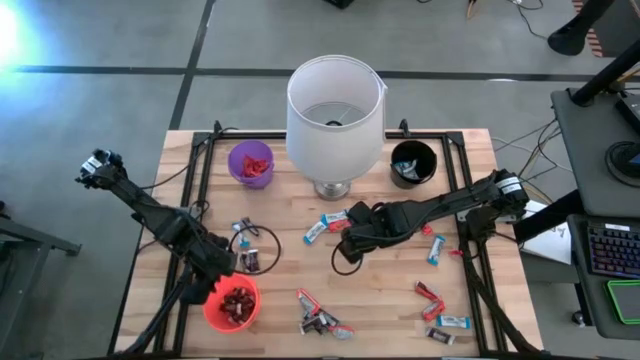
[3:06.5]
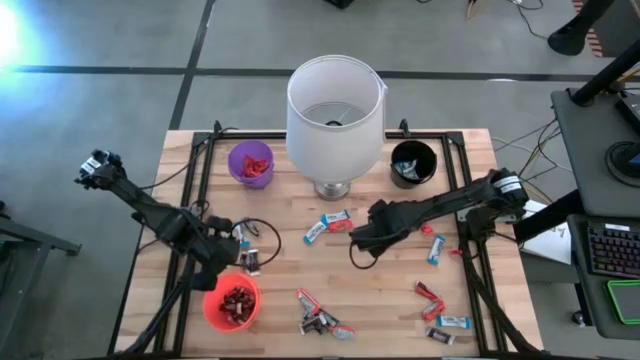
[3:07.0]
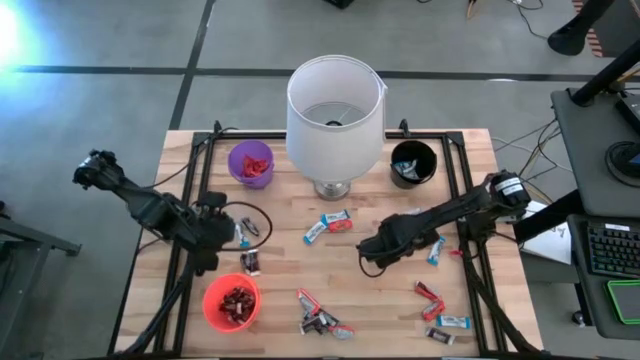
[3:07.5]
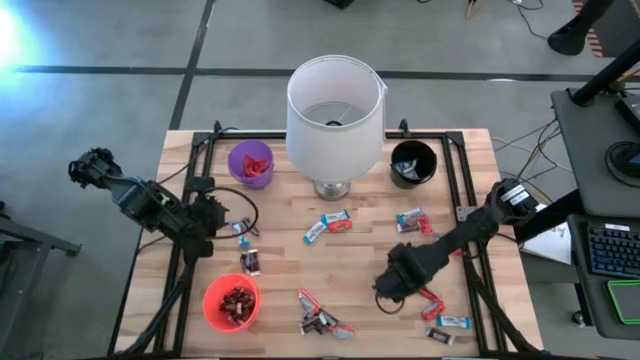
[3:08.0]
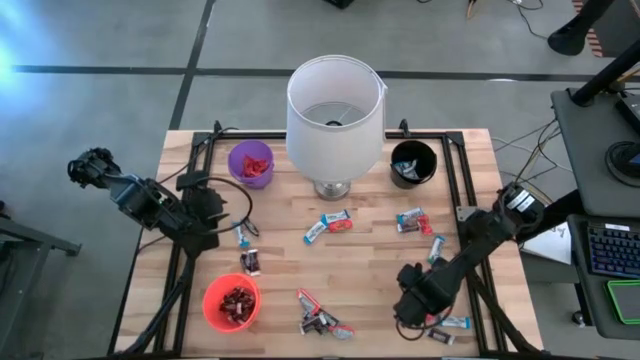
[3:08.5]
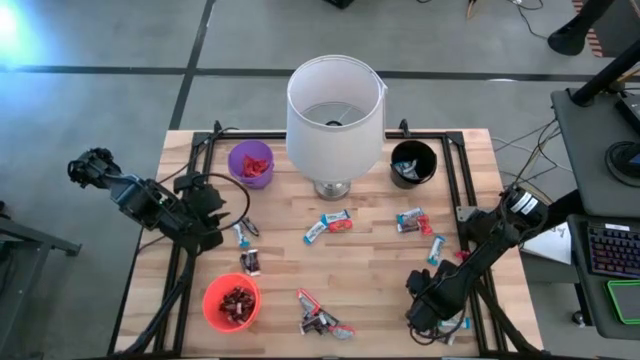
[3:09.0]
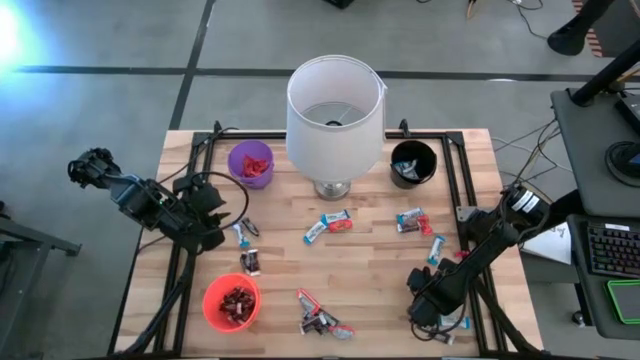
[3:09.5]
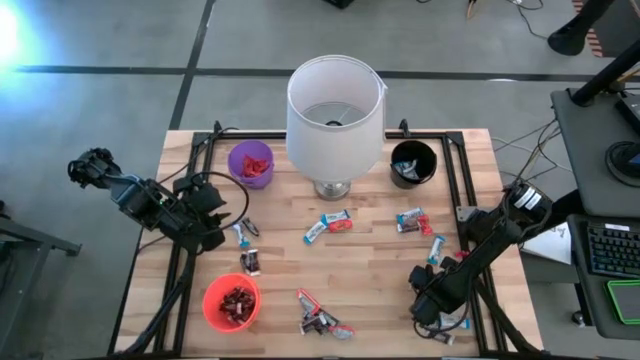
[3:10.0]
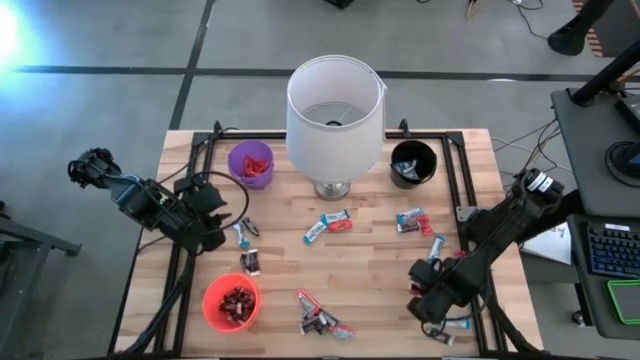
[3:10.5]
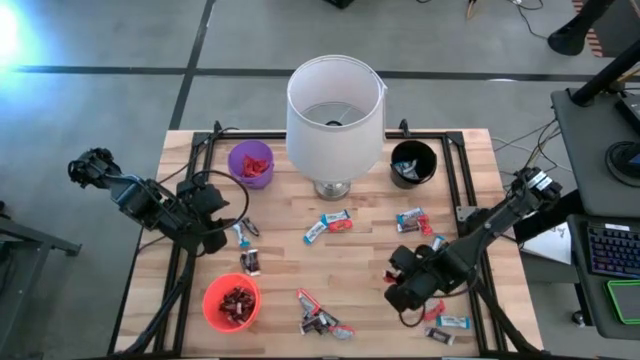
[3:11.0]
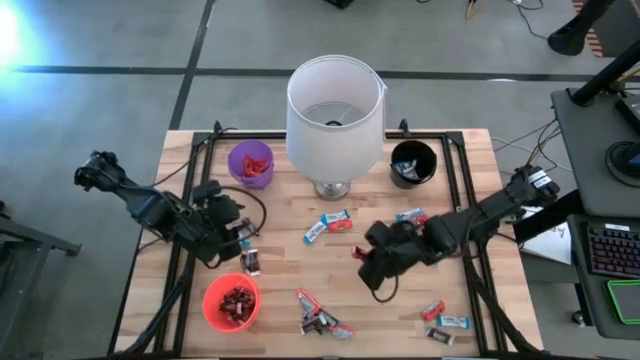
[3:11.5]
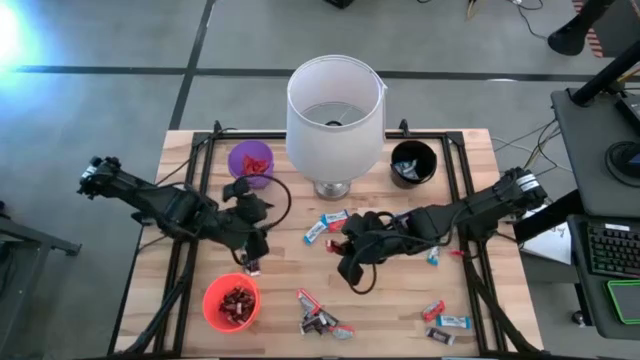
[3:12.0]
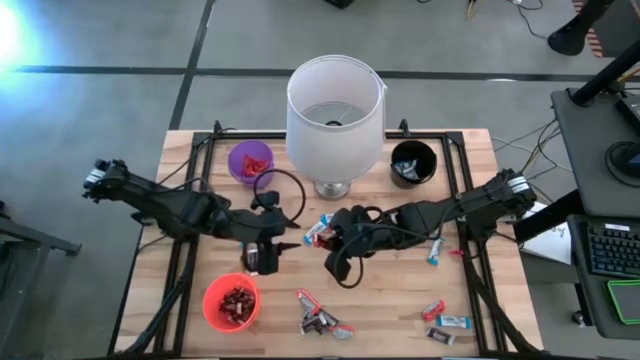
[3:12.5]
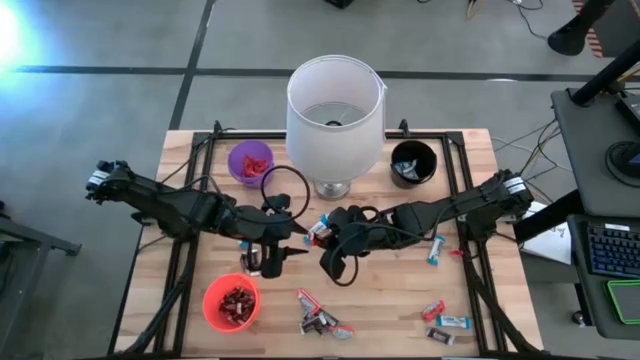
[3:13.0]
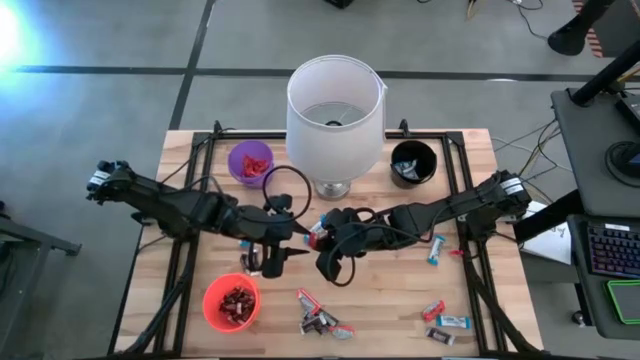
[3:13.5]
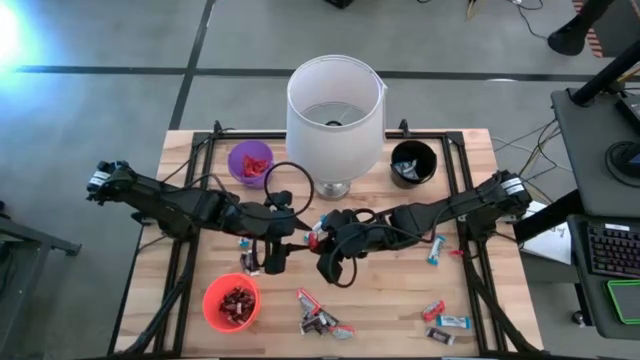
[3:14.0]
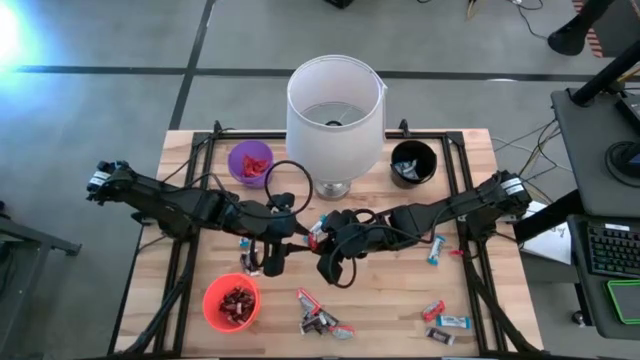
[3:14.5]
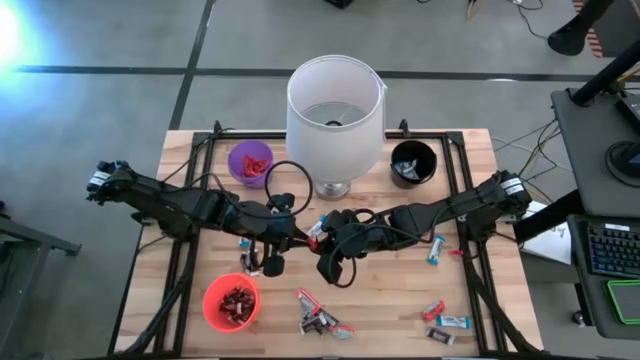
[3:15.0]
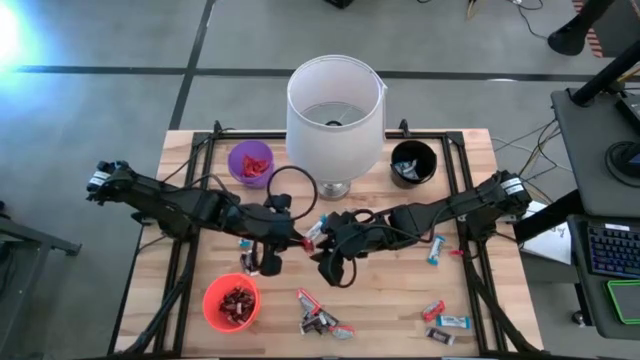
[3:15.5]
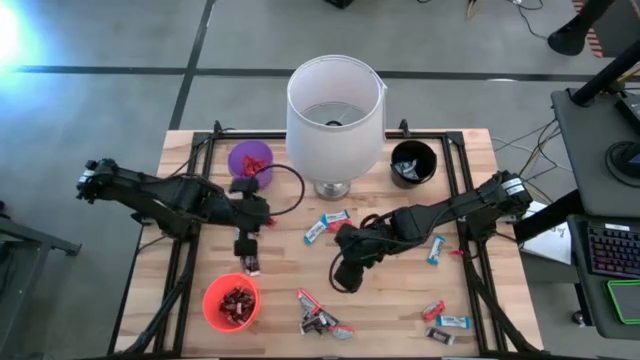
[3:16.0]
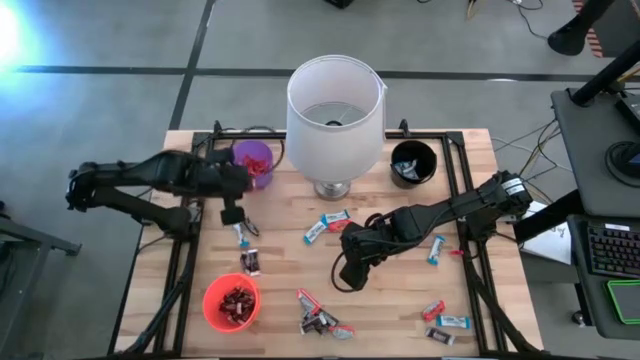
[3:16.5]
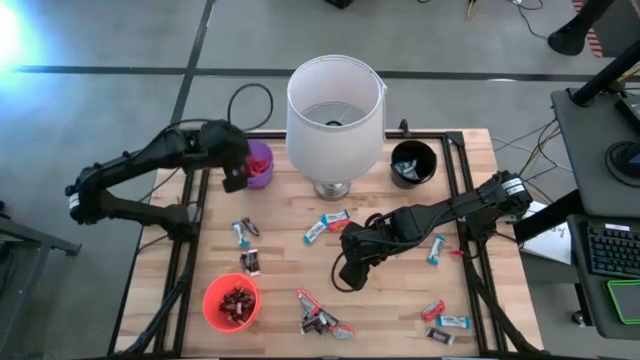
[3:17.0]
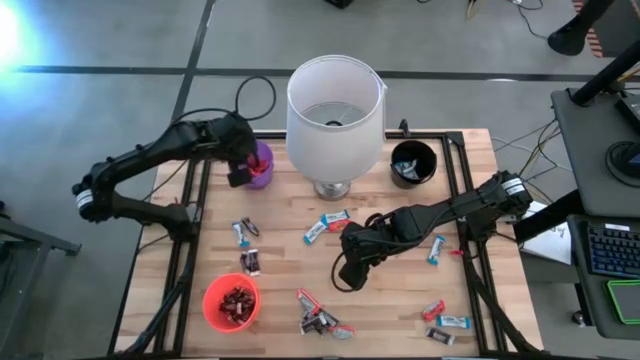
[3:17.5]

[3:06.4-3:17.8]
Task: Sort candy
Put the black chocolate into the orange bucket

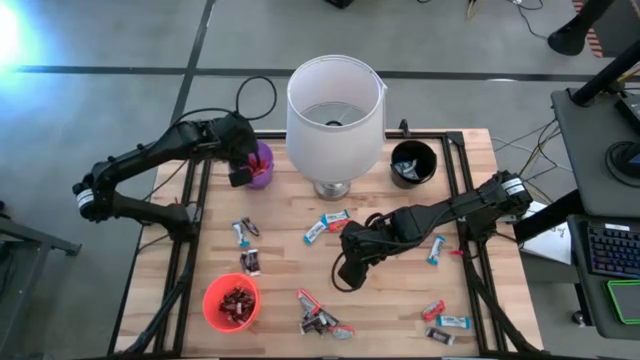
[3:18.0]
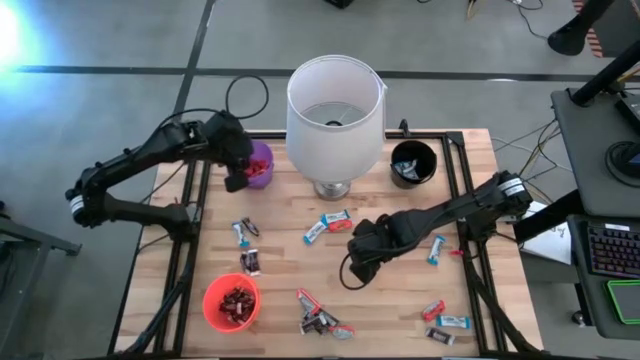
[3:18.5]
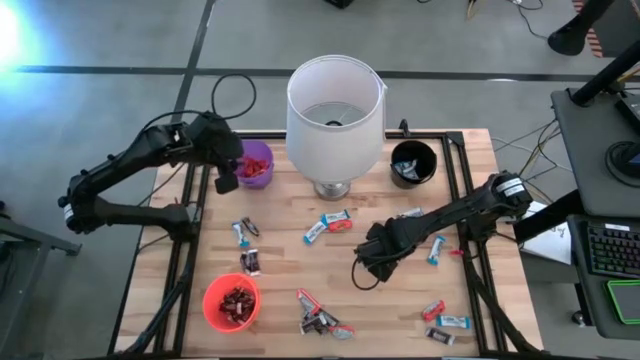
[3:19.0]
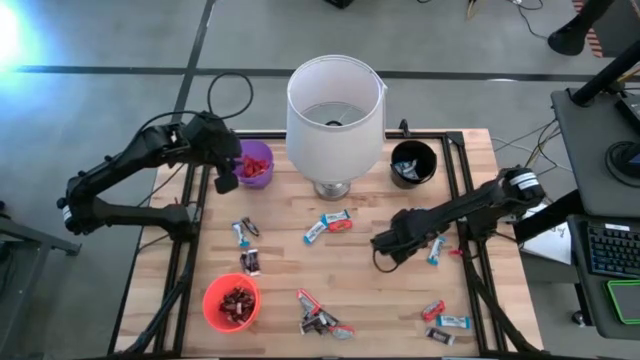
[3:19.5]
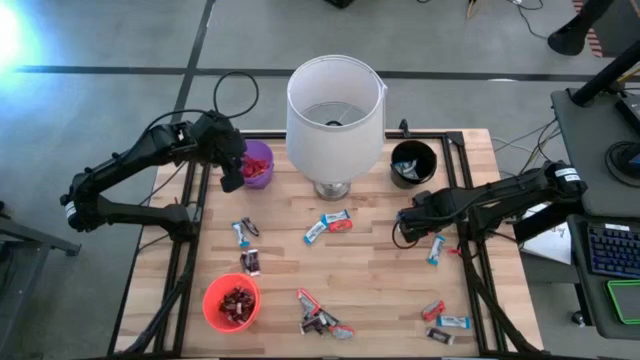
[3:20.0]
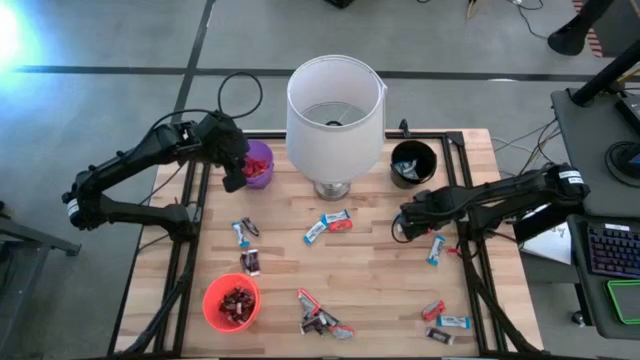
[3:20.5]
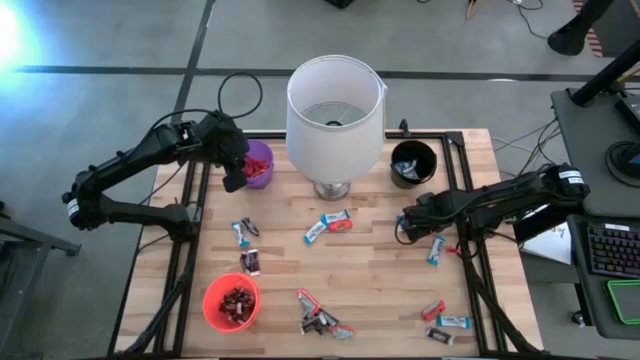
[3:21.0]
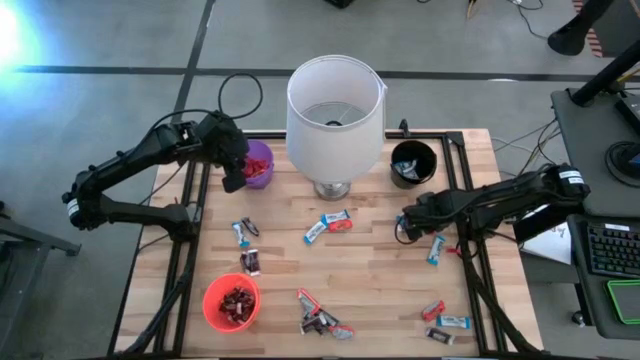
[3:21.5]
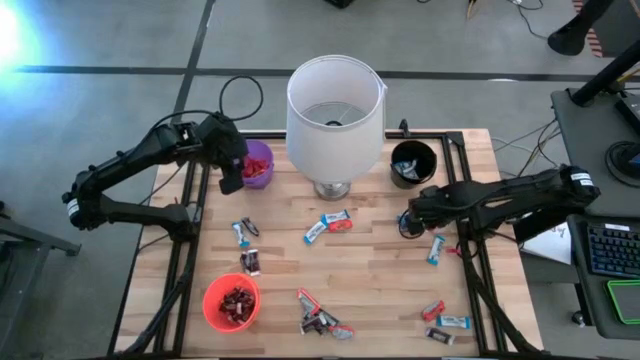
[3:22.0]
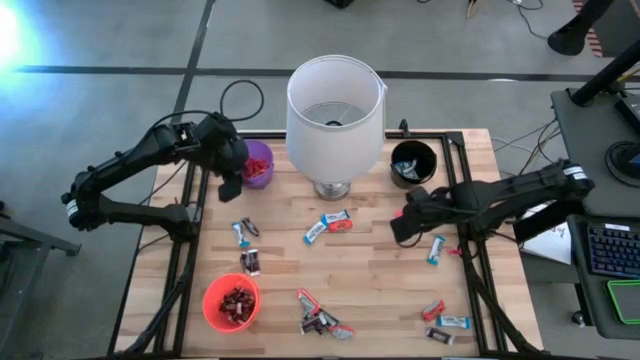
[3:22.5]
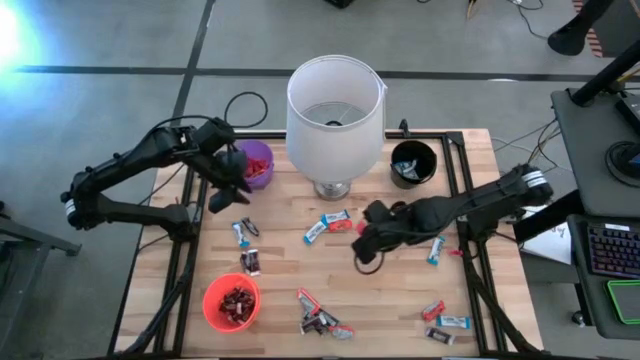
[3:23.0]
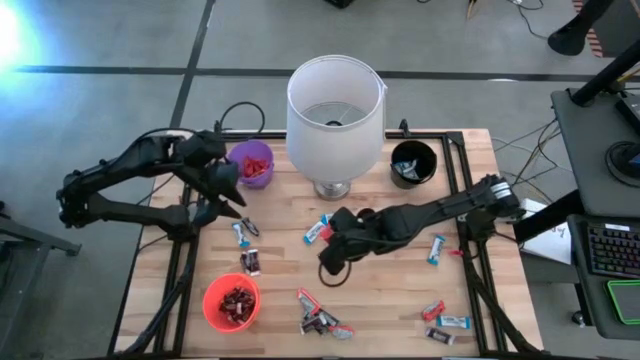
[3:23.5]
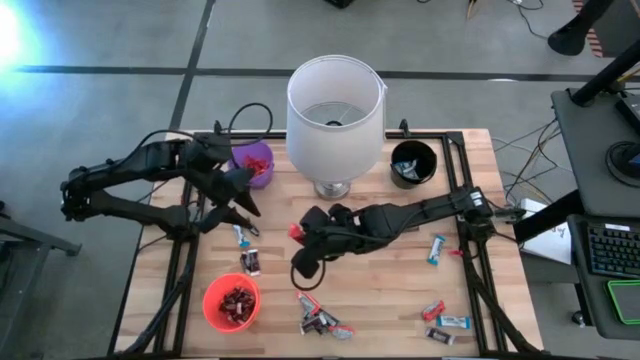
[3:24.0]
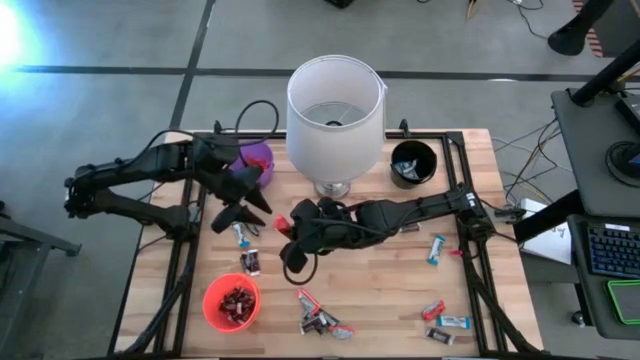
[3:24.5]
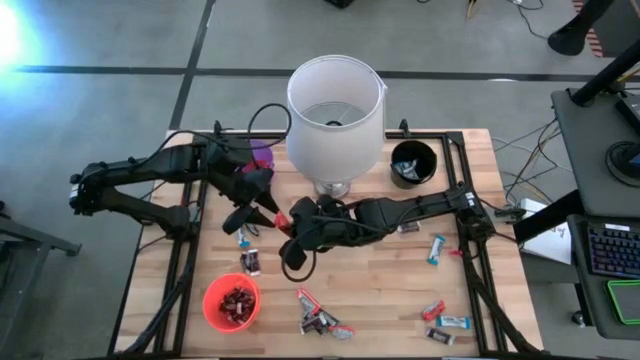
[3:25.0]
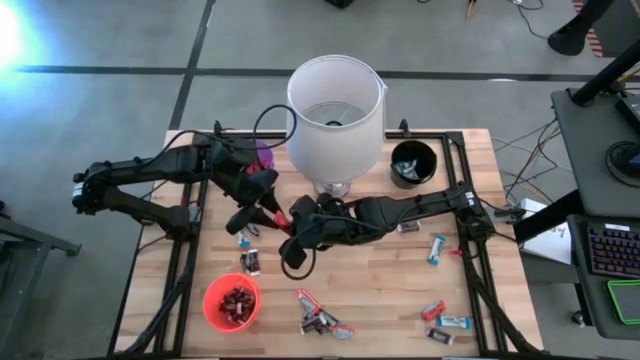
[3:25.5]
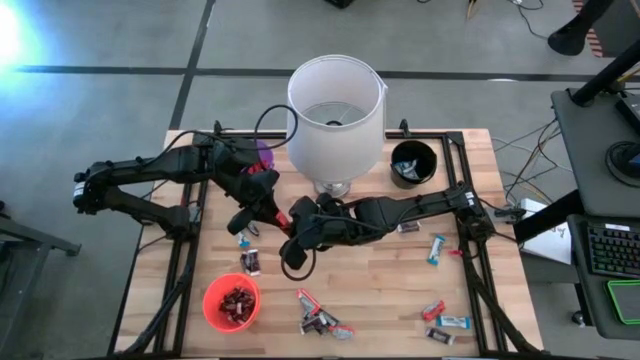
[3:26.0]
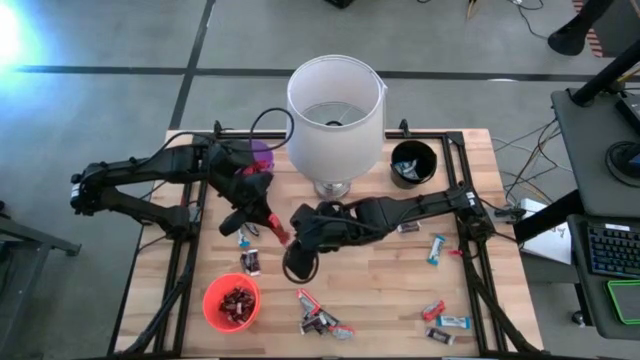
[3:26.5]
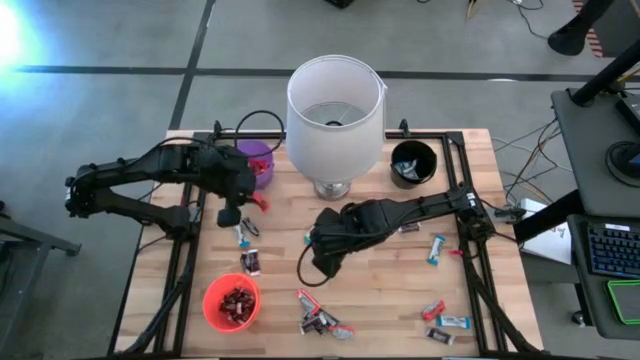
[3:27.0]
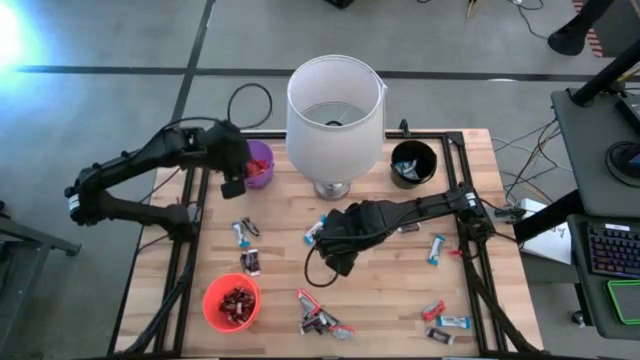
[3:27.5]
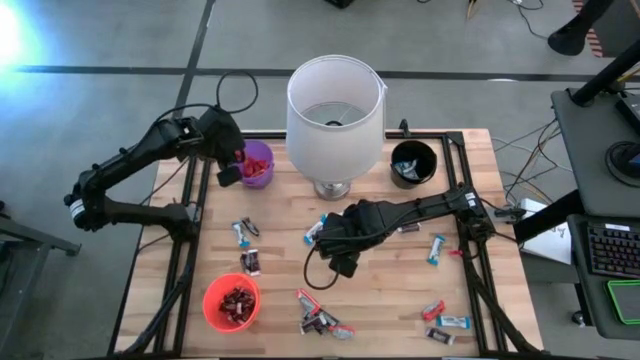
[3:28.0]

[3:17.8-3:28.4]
Put the orange chocolate into the purple bucket
